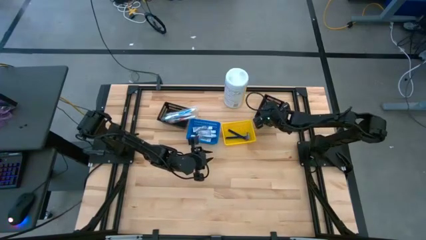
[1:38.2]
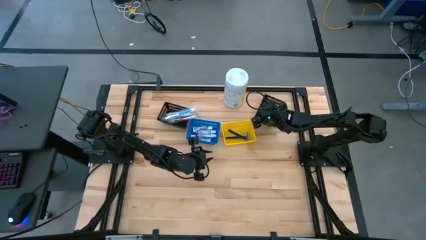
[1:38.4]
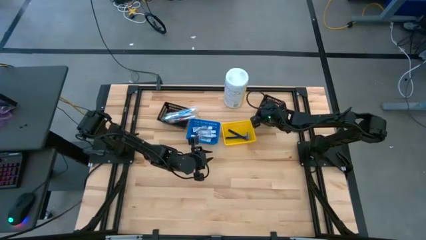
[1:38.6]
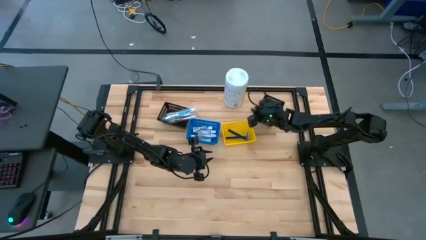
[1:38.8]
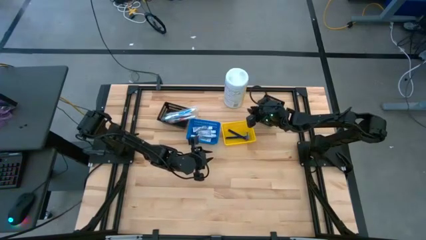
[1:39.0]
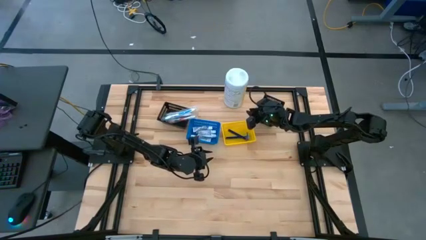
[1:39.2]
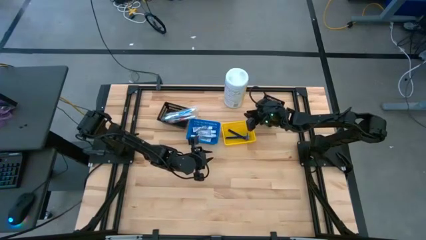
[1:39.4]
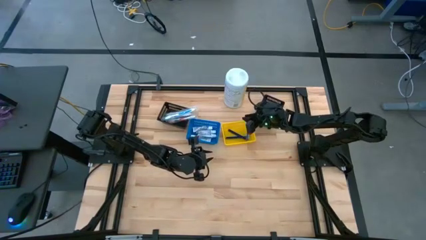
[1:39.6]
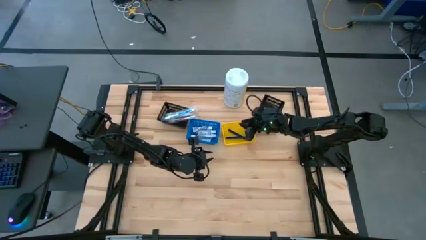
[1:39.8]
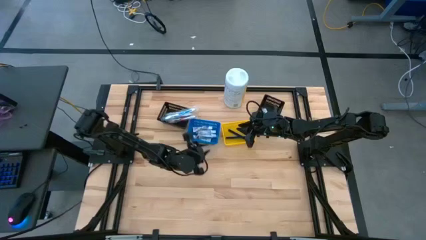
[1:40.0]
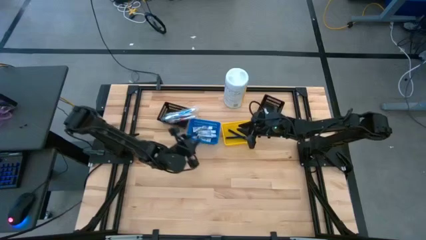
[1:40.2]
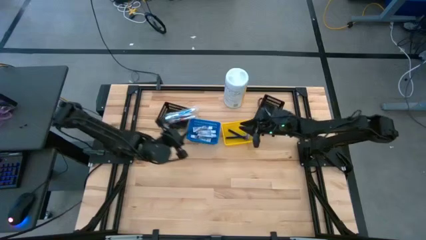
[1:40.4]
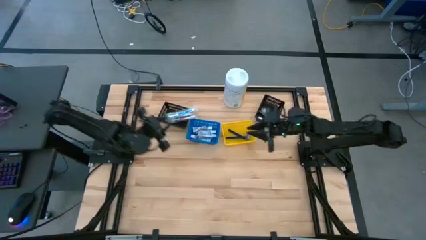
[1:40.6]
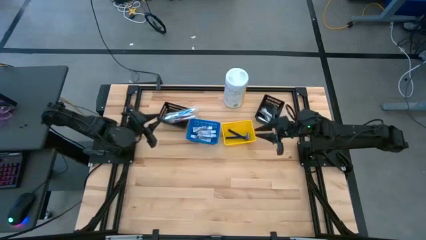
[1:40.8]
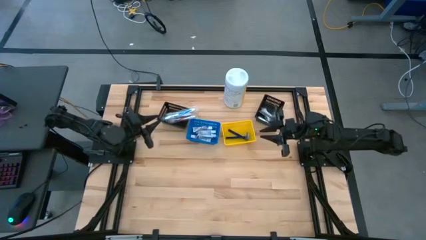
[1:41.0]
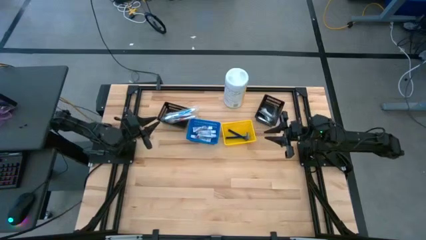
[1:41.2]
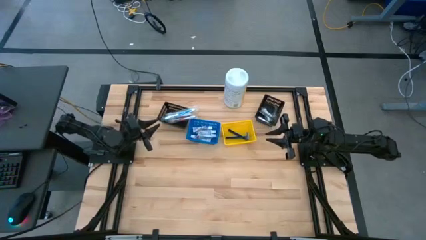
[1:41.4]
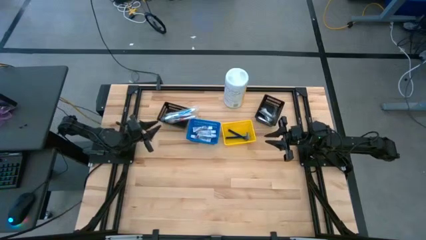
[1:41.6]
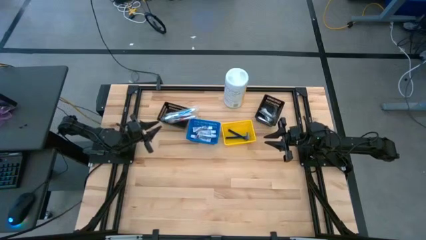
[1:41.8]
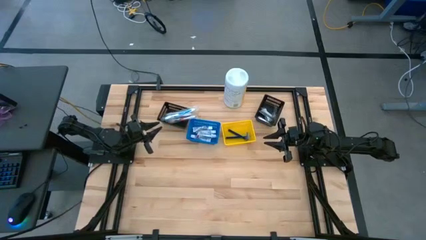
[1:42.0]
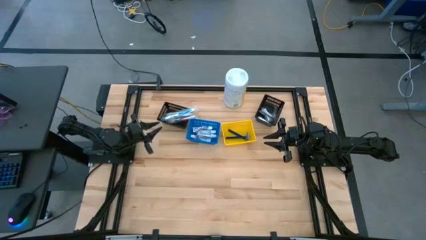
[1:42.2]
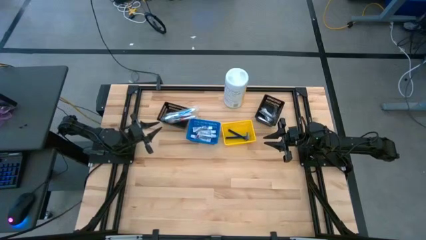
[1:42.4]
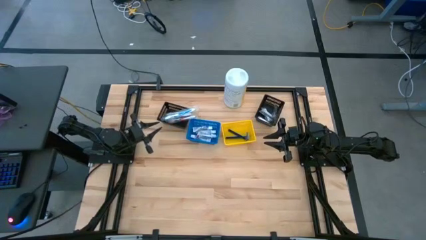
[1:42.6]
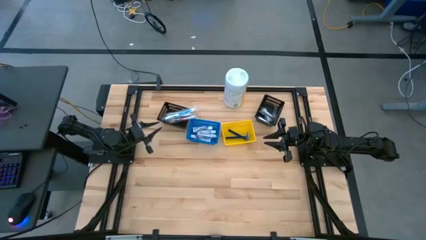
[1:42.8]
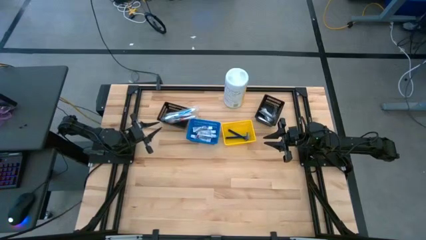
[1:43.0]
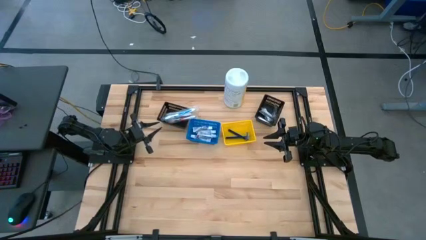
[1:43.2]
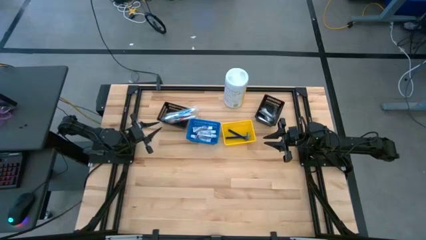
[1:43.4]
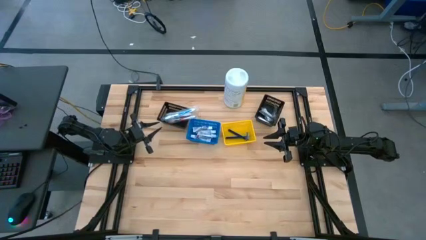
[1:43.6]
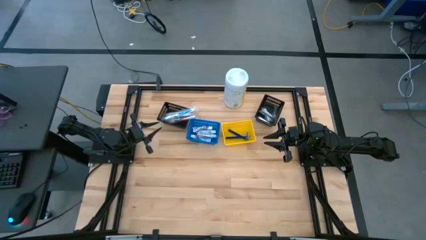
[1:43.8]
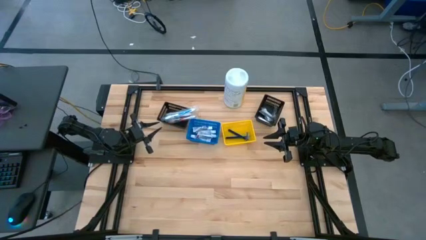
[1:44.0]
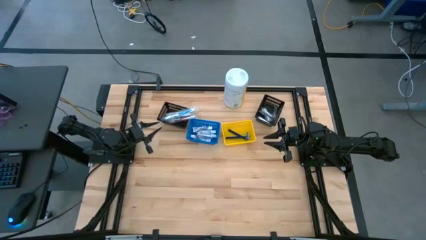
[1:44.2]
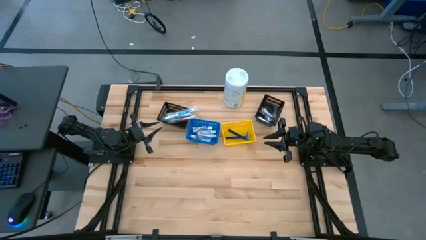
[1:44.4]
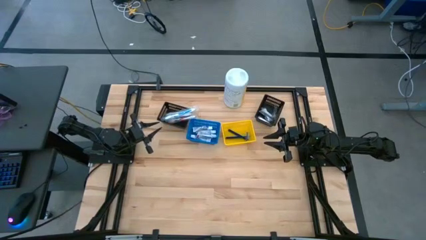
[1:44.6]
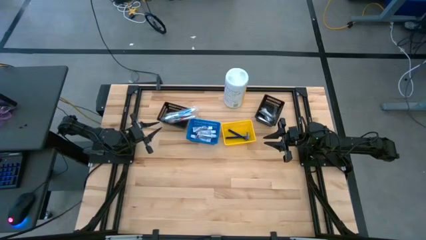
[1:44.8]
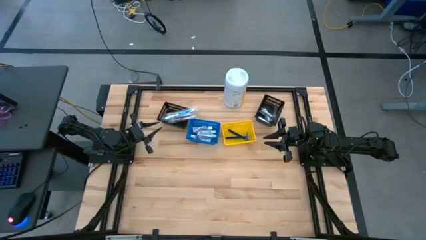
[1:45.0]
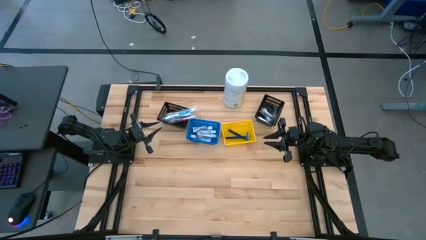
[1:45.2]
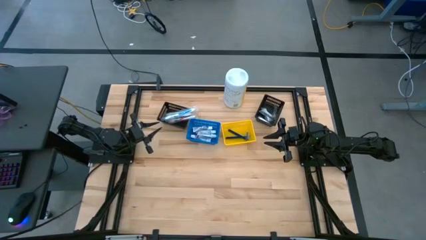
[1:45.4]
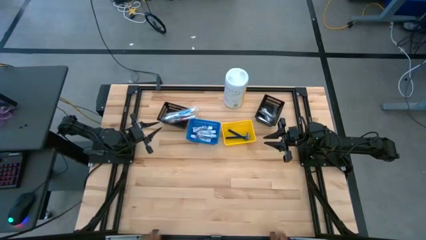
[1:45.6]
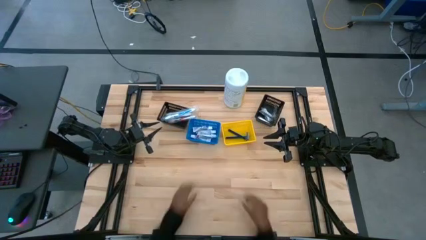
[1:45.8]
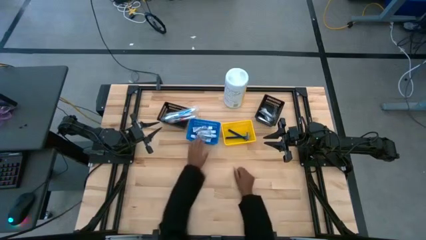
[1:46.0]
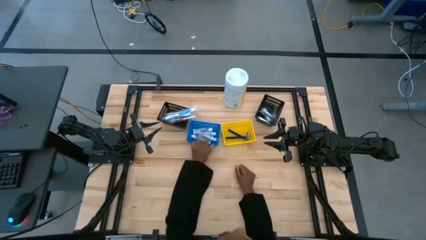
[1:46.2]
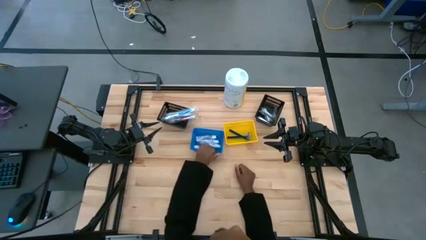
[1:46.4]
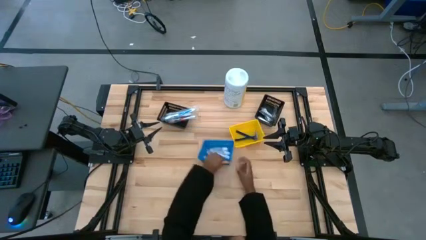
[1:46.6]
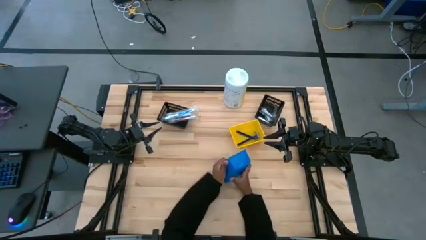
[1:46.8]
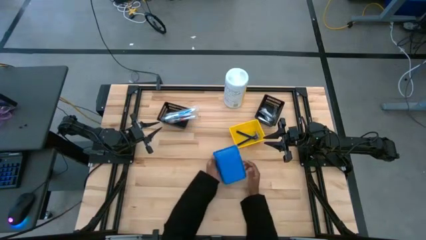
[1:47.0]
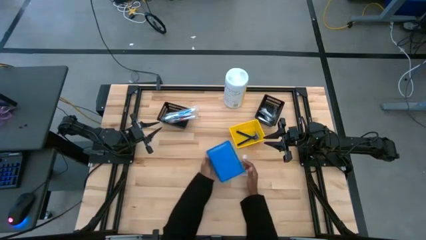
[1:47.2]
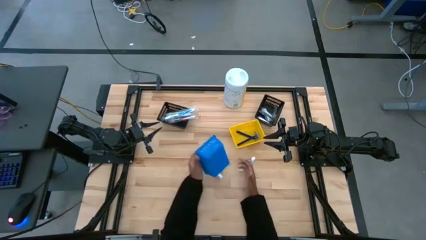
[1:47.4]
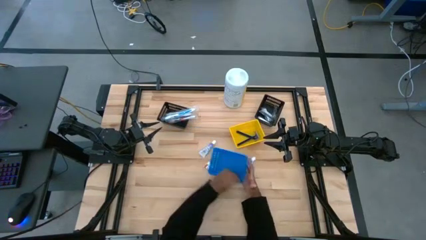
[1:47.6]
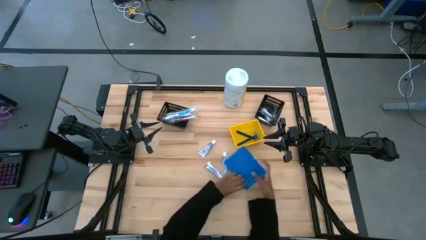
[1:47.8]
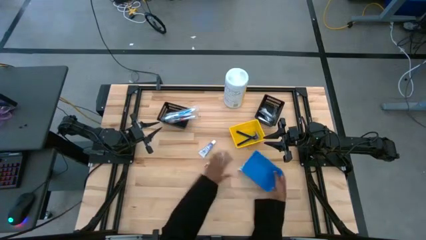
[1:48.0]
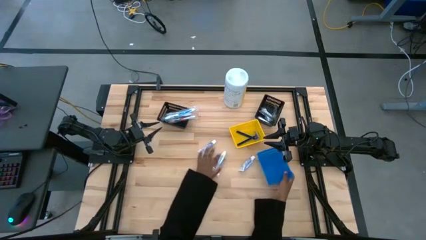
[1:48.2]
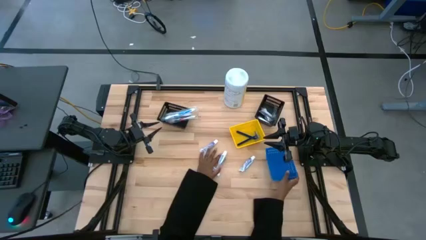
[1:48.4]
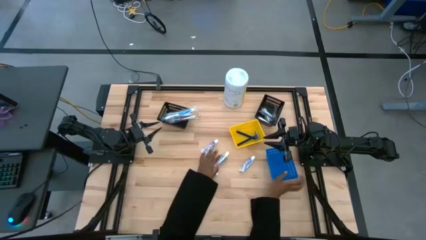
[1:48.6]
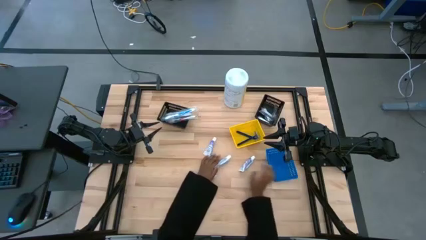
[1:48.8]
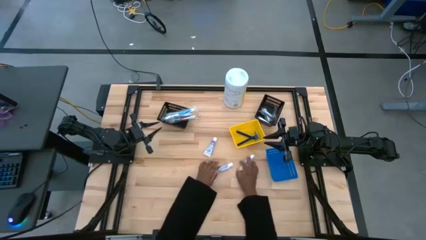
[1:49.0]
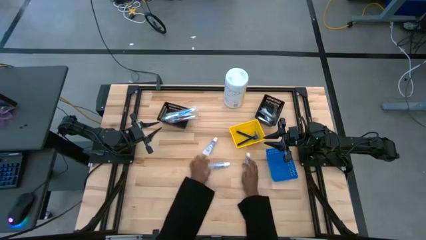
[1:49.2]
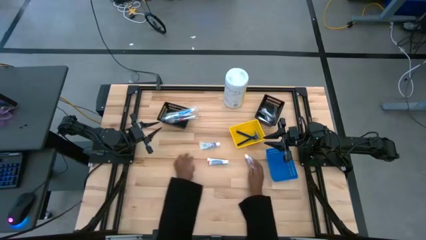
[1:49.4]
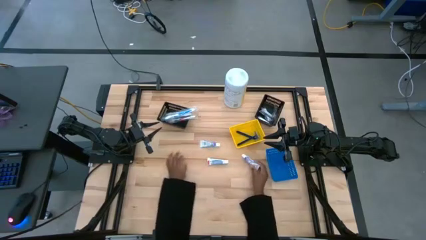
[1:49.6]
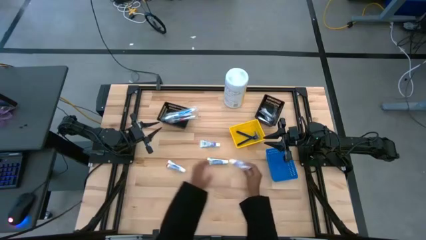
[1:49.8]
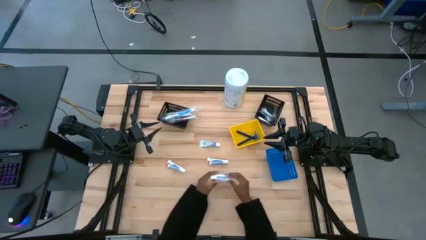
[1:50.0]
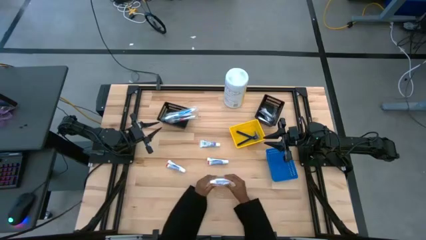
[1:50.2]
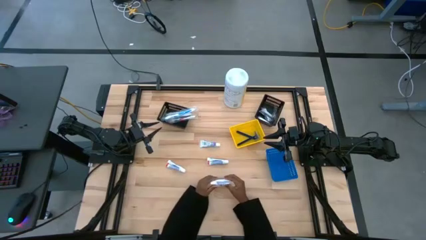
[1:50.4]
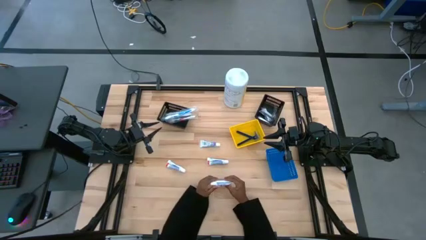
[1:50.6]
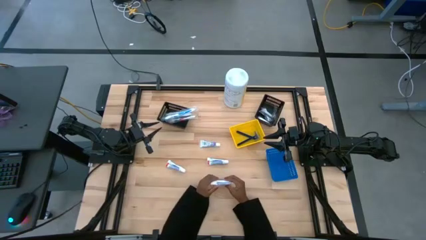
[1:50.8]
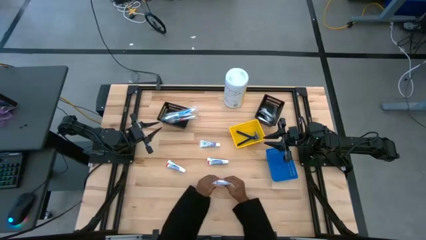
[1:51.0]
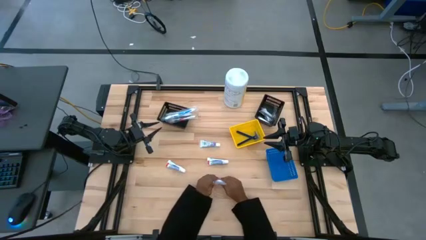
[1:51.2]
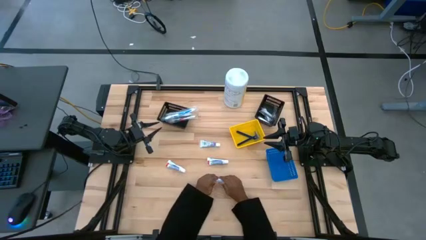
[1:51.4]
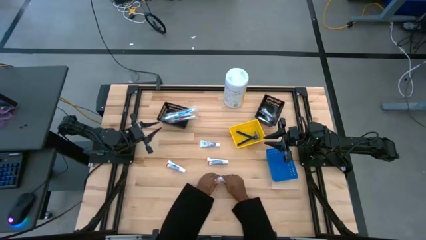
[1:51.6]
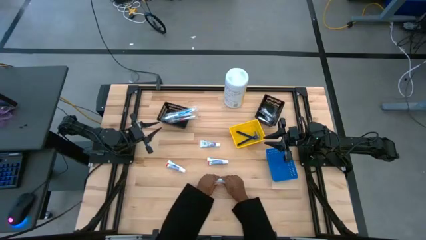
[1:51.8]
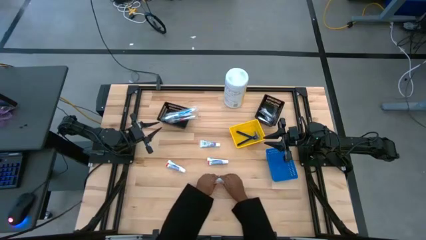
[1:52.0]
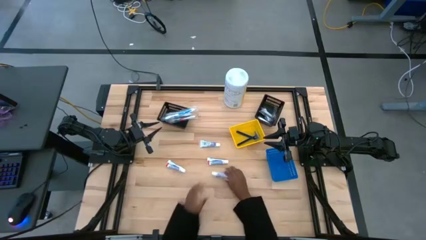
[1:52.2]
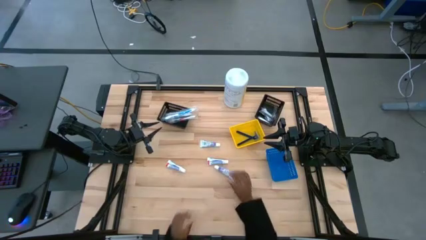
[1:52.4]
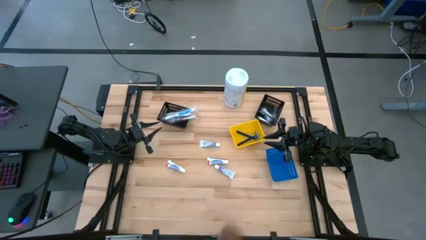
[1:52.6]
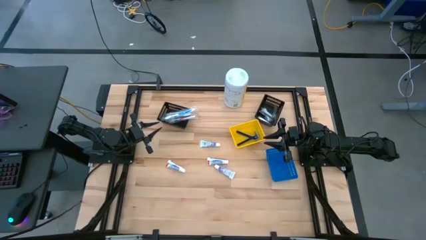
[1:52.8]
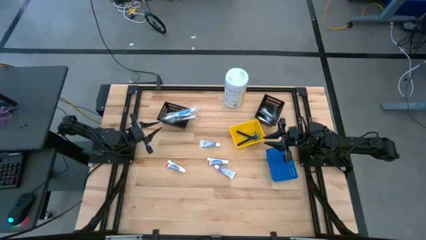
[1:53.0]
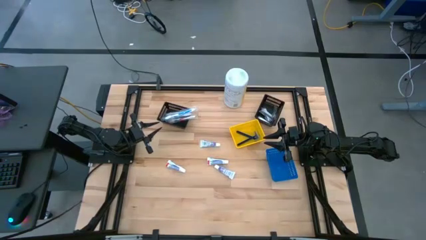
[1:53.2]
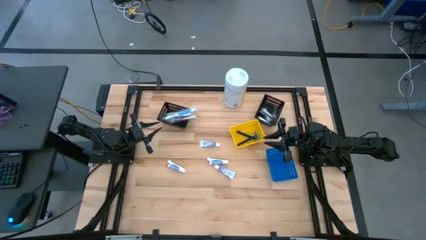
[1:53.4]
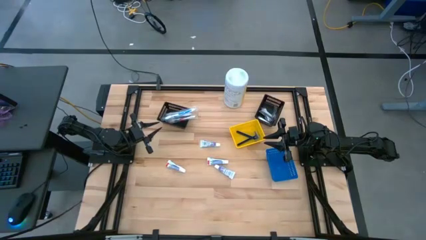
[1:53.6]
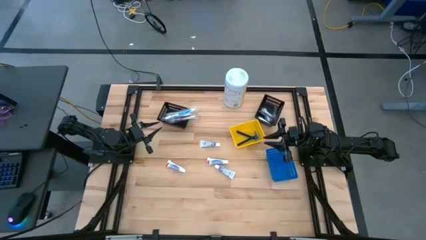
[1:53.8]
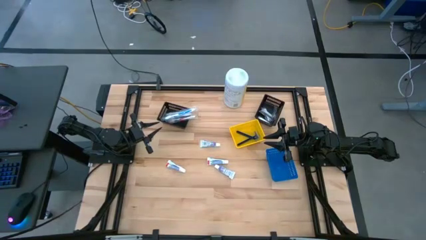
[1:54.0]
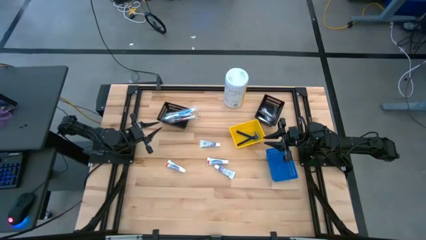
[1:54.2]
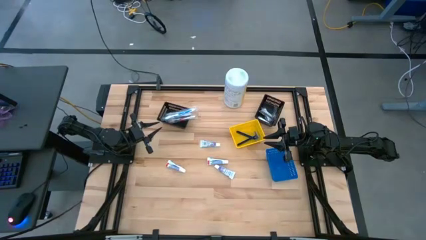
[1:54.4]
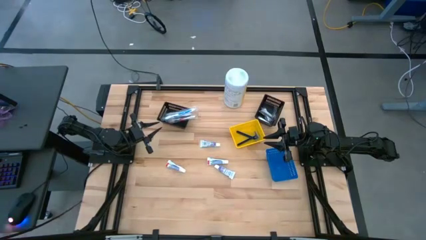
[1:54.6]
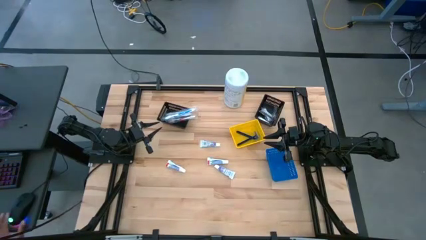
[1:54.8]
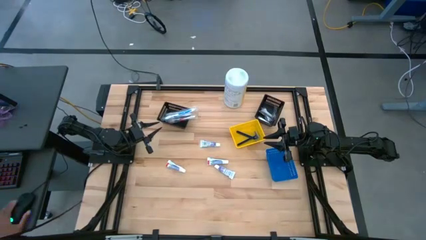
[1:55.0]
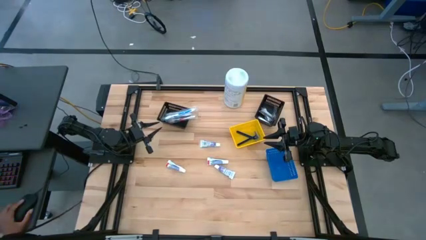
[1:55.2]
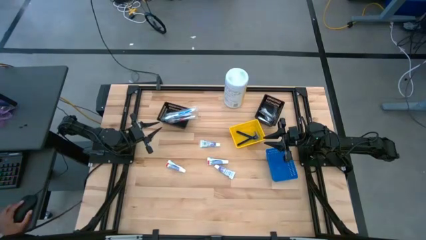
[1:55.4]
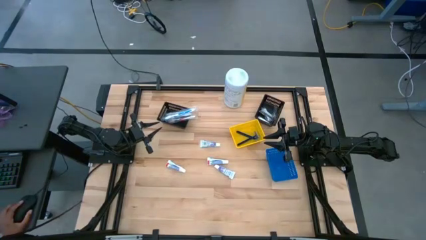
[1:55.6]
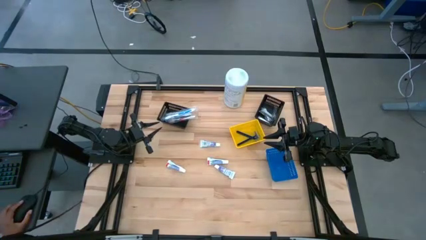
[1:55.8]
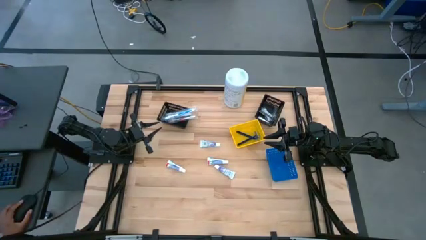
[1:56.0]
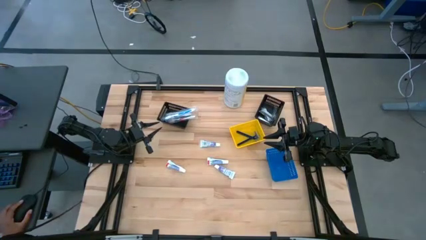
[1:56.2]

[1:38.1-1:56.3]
Task: Pick & Place Travel size toiletries
Return to Home Position
